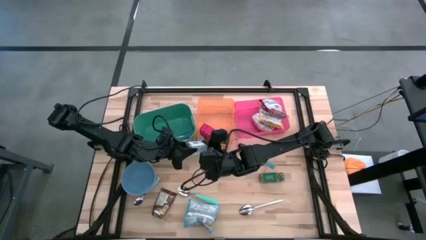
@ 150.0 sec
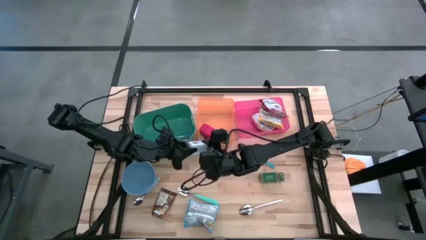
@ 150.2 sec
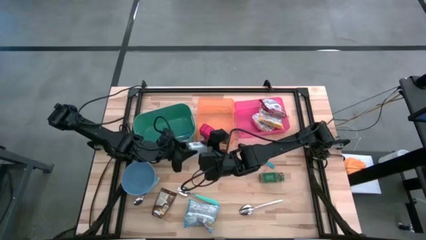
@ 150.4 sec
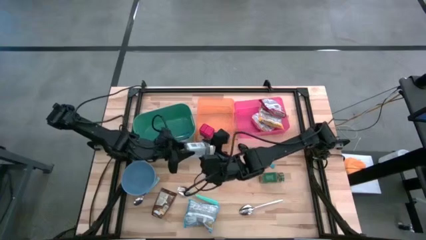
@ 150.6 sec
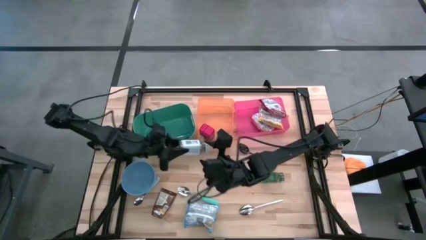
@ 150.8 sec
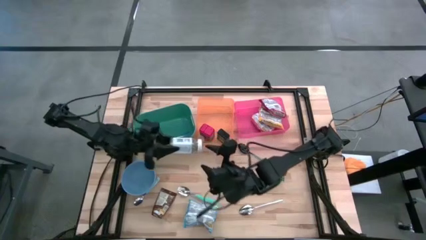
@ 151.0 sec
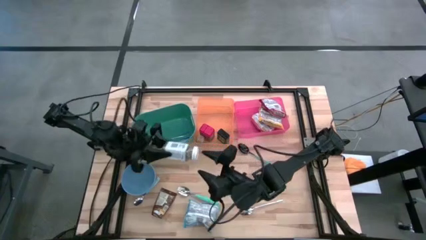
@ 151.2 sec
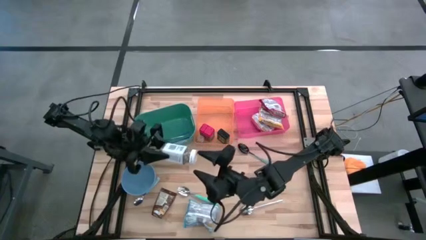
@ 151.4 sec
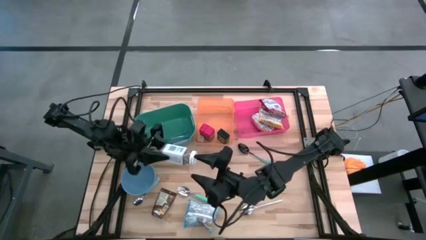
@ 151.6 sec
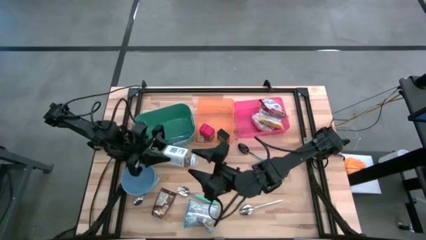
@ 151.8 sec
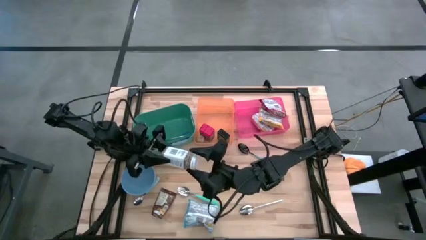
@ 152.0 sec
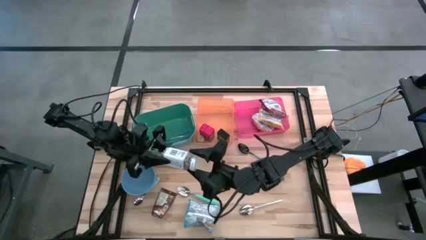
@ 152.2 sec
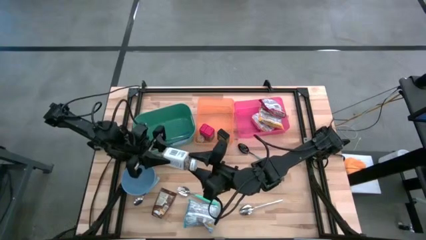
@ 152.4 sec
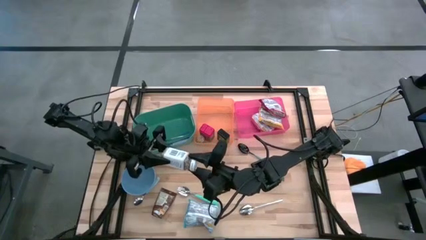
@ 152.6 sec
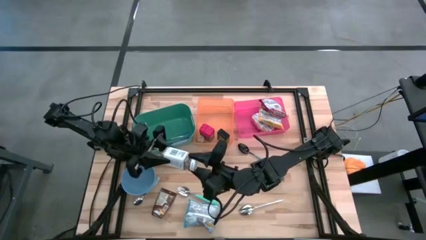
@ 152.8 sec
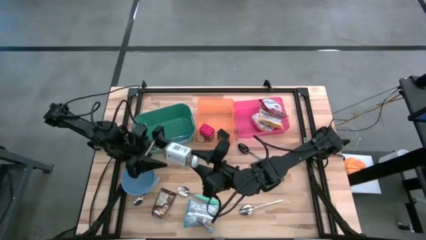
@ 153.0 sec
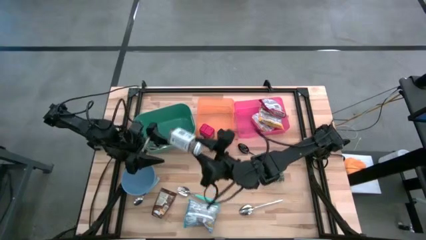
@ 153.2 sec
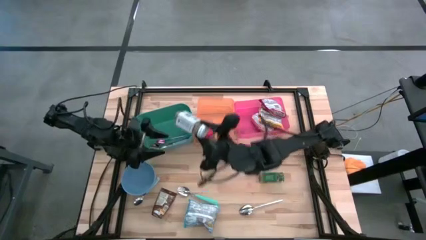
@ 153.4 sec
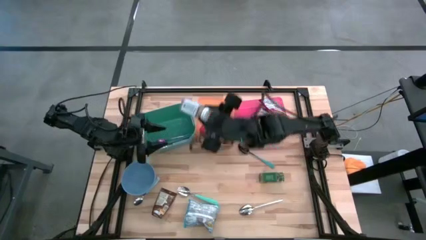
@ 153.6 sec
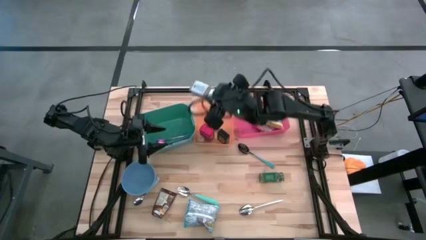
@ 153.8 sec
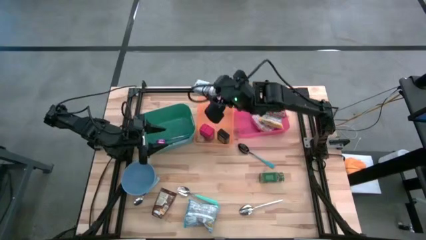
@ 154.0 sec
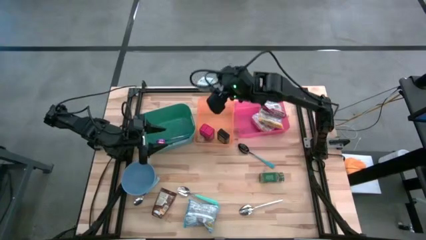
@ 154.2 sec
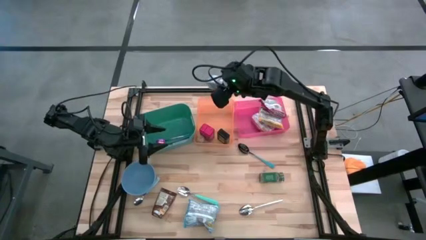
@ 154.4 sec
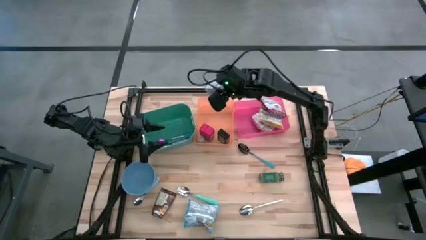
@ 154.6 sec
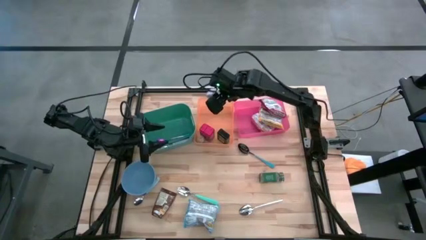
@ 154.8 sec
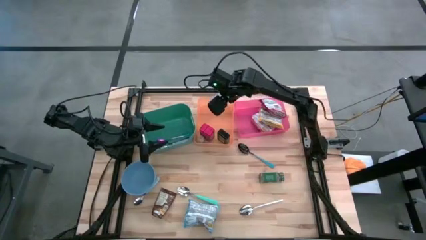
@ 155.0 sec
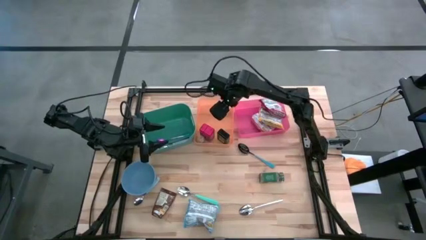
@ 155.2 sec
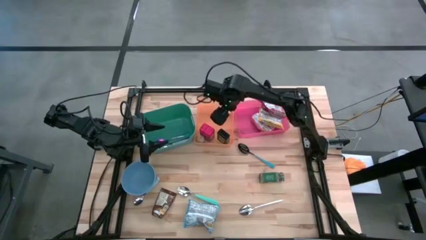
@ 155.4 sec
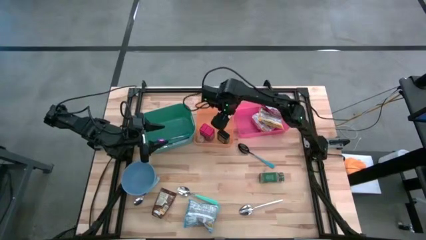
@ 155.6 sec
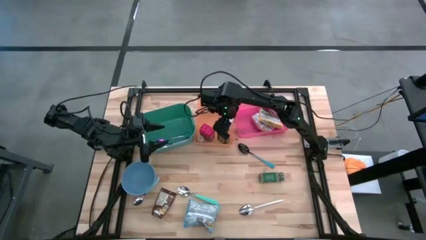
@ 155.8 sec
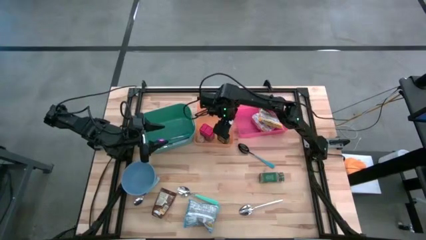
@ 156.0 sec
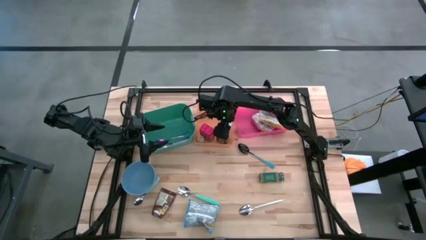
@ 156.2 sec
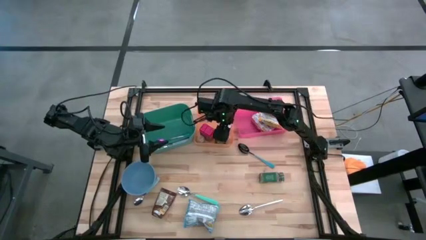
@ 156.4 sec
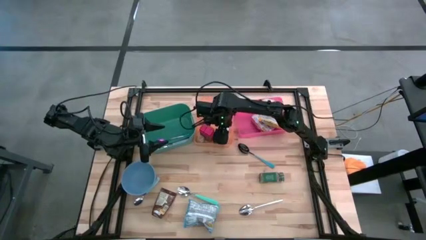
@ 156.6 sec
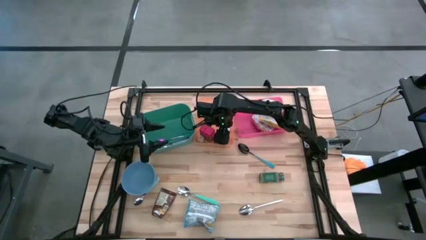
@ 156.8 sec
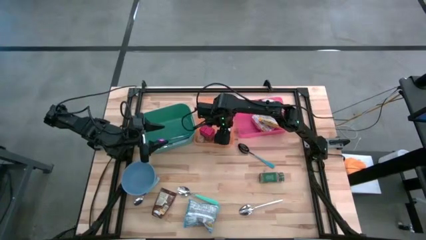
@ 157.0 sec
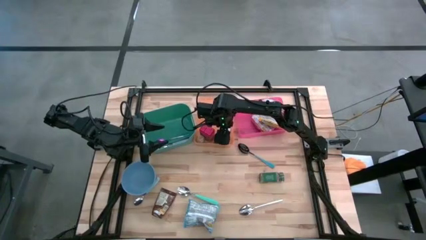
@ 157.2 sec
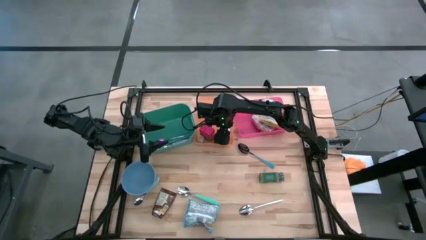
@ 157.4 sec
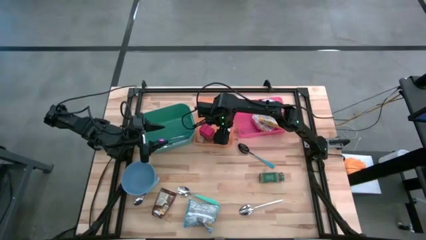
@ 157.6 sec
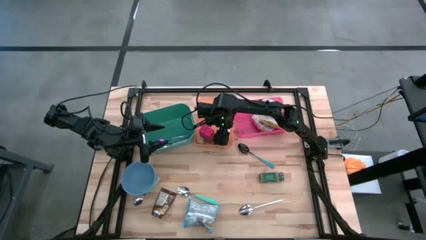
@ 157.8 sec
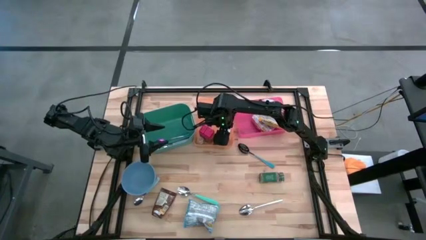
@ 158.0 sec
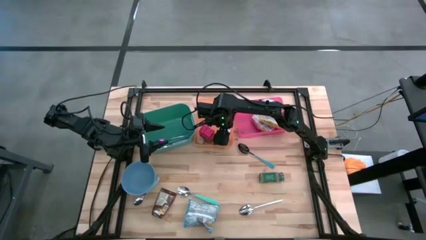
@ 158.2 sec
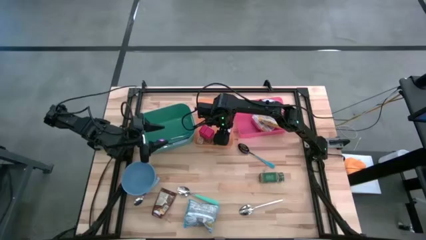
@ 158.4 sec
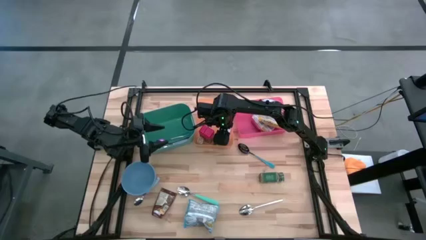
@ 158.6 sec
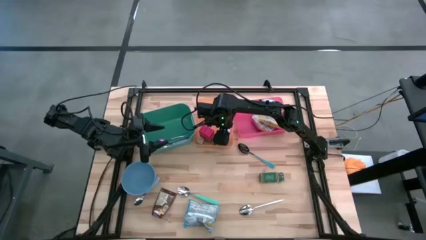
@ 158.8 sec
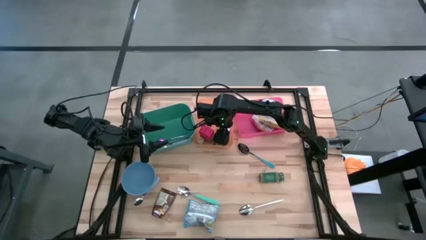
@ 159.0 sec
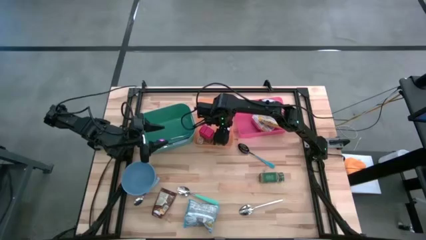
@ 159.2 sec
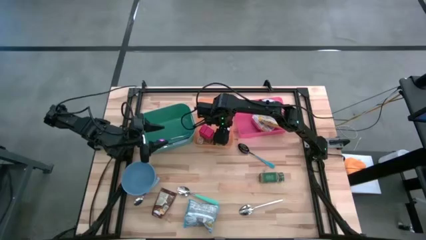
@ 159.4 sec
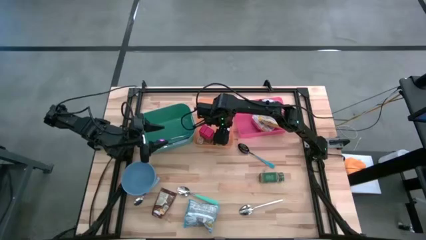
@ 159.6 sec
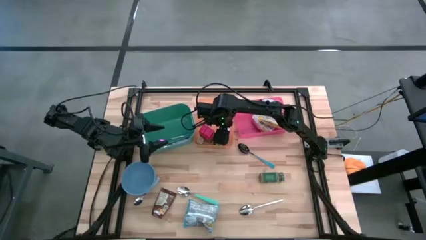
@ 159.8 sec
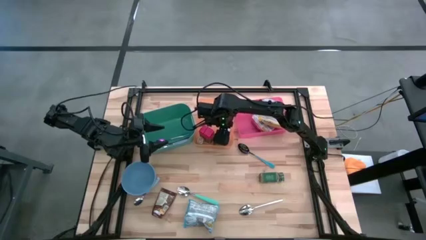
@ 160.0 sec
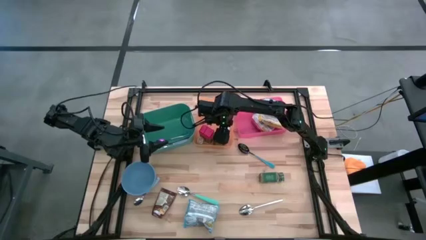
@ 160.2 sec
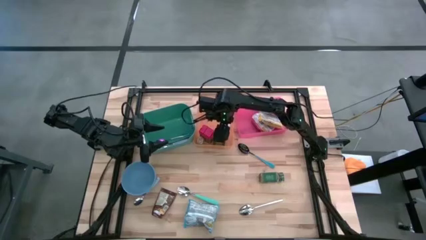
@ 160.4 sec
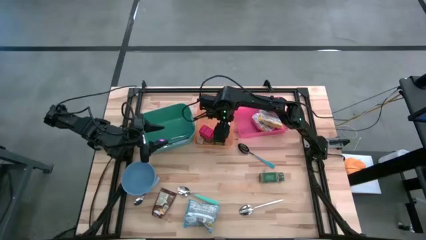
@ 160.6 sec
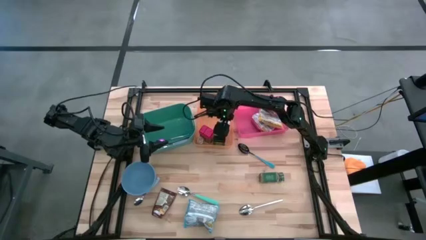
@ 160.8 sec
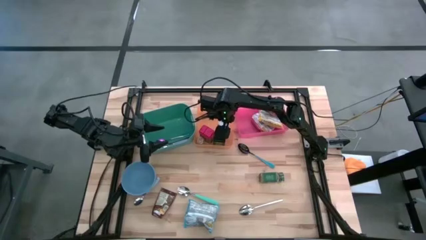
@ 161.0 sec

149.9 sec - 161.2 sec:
Put the white seasoning bottle into the orange bin

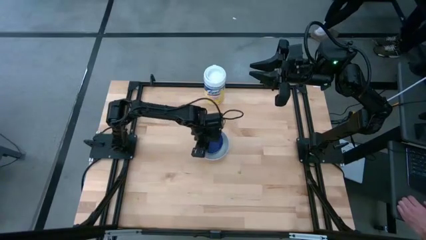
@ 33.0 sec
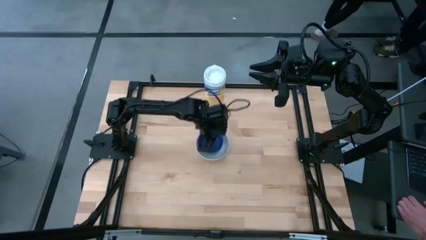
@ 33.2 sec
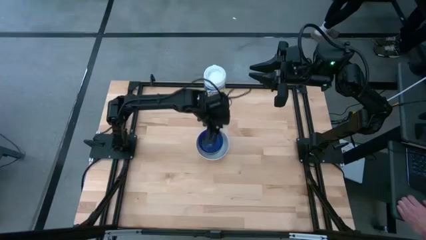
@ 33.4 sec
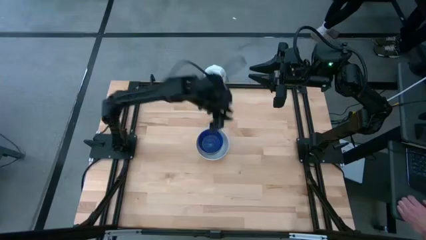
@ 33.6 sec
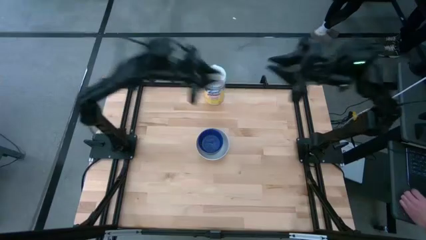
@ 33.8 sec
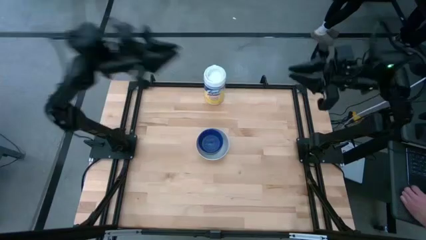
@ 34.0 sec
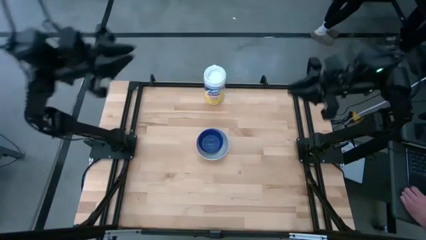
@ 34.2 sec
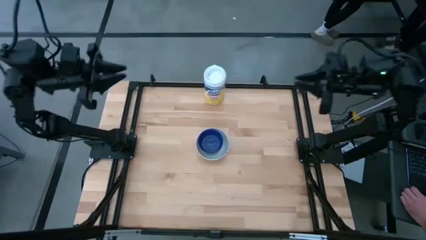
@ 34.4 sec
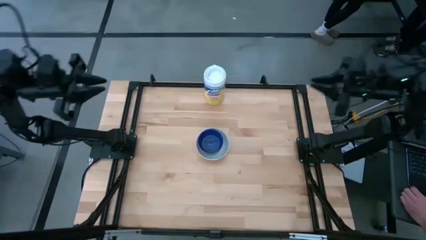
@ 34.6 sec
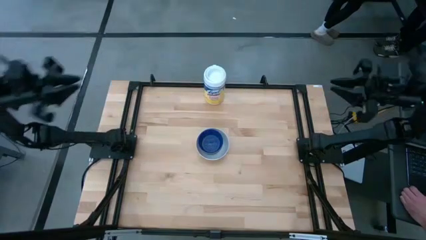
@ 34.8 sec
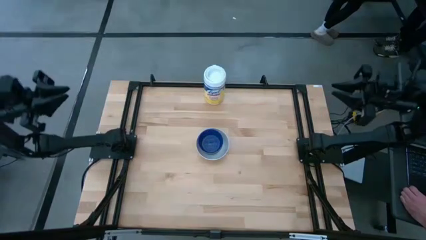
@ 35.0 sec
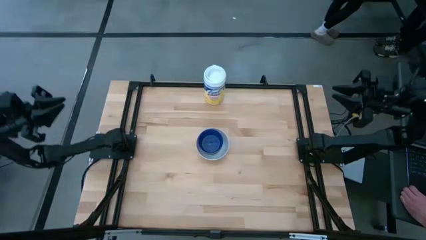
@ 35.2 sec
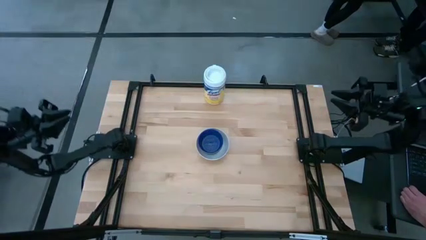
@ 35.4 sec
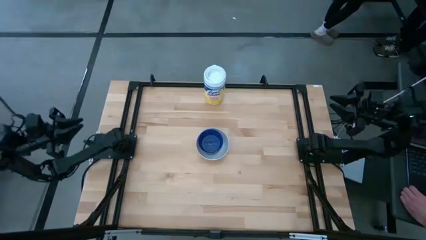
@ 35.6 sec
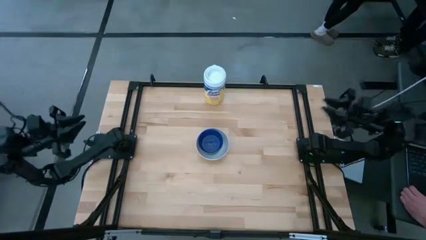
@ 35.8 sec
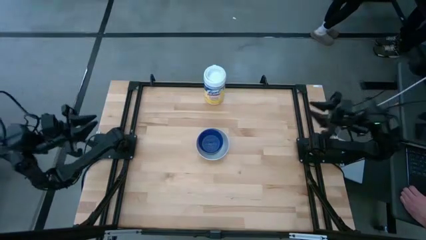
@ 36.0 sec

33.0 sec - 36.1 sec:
Return to Home Position
